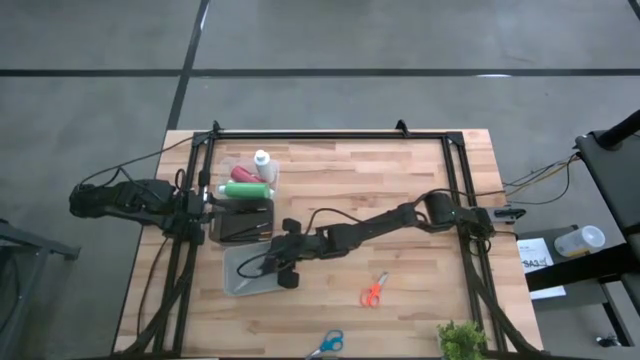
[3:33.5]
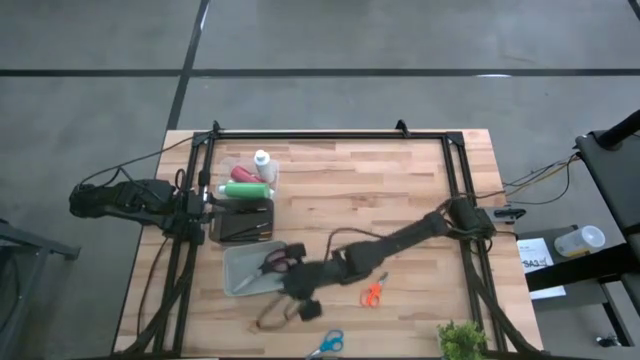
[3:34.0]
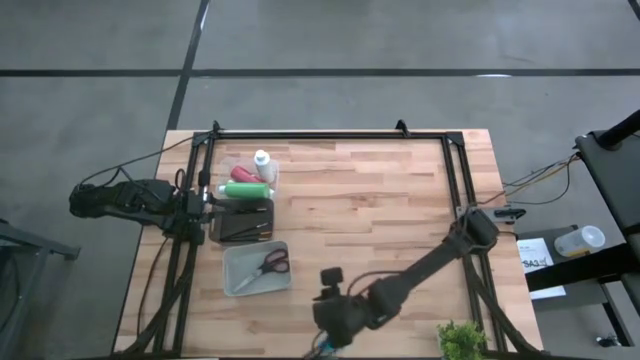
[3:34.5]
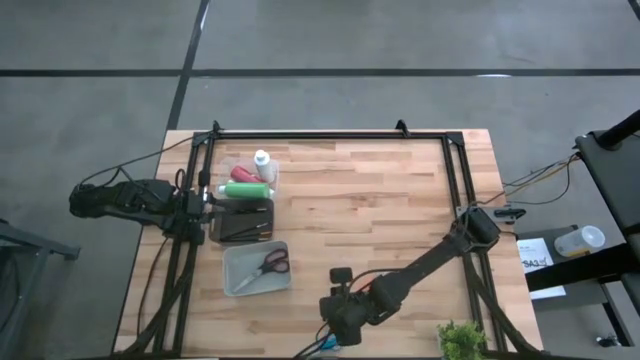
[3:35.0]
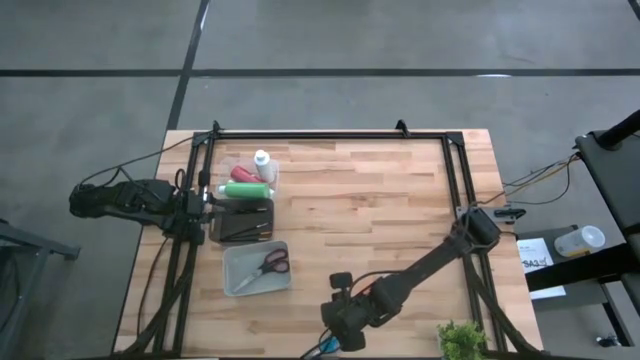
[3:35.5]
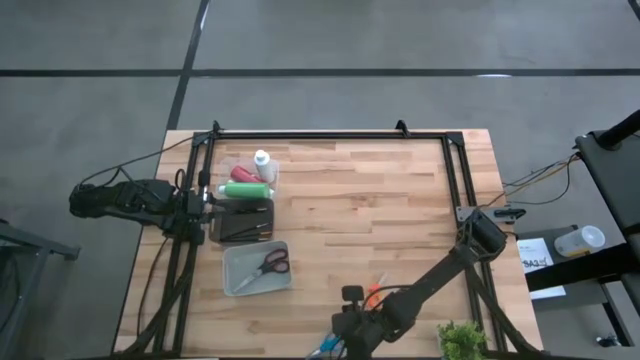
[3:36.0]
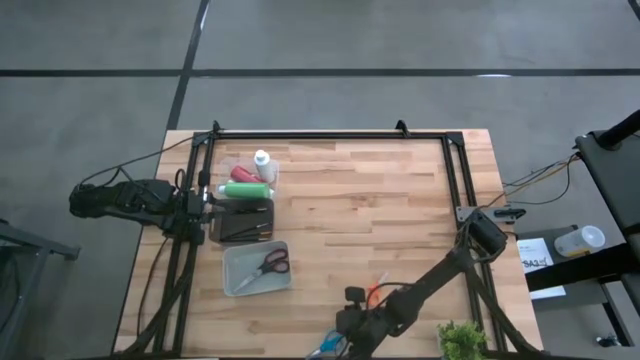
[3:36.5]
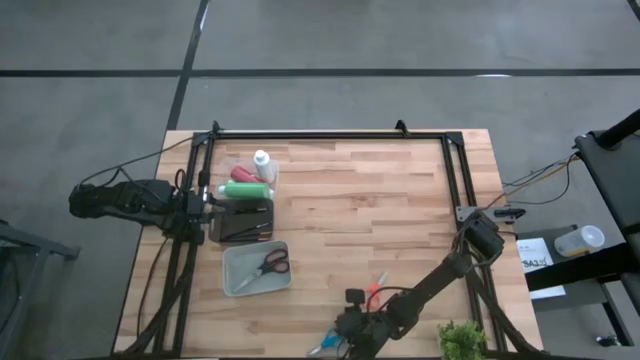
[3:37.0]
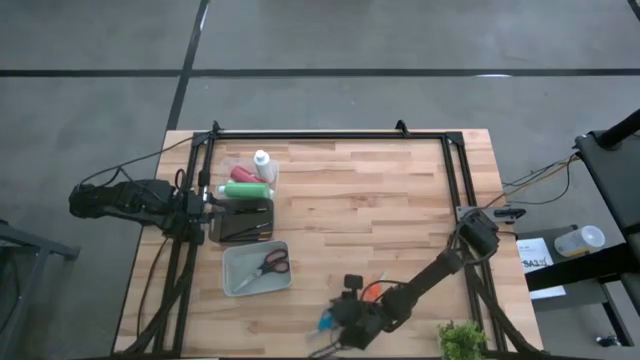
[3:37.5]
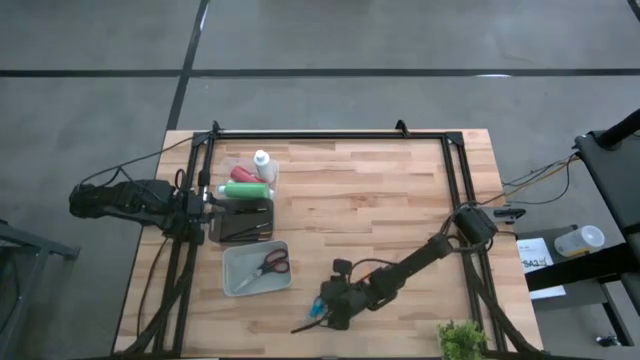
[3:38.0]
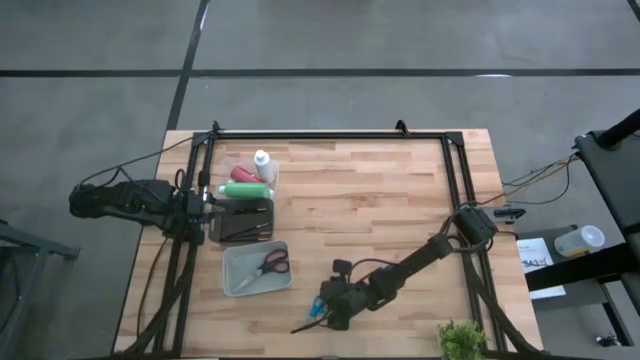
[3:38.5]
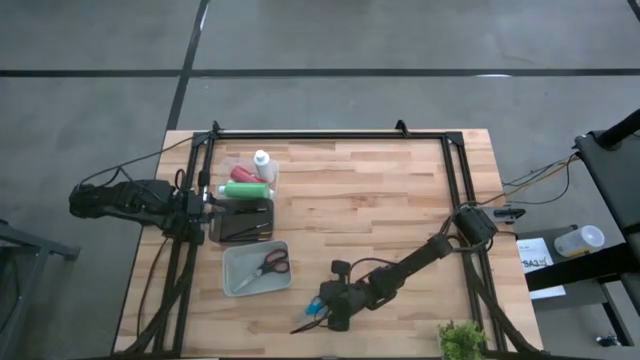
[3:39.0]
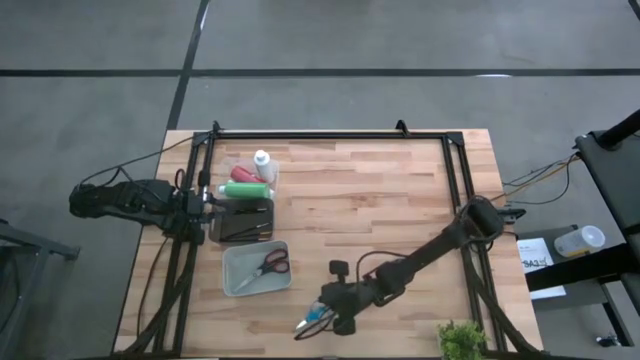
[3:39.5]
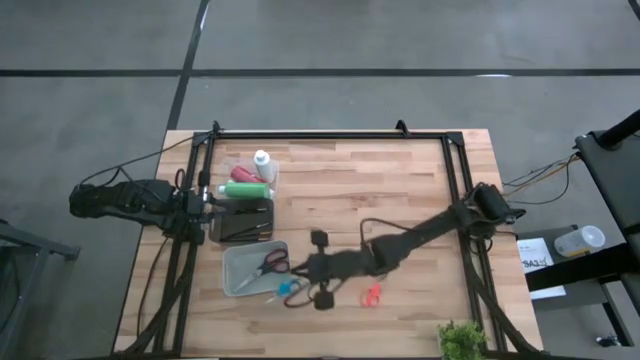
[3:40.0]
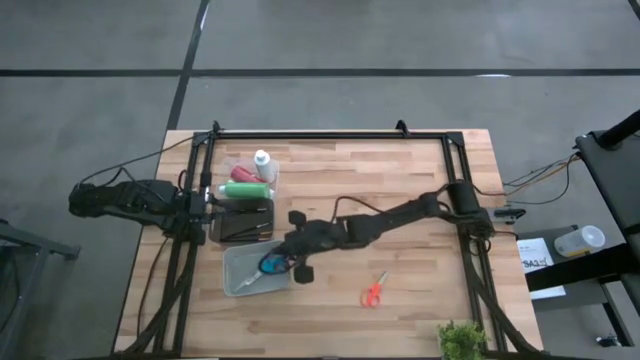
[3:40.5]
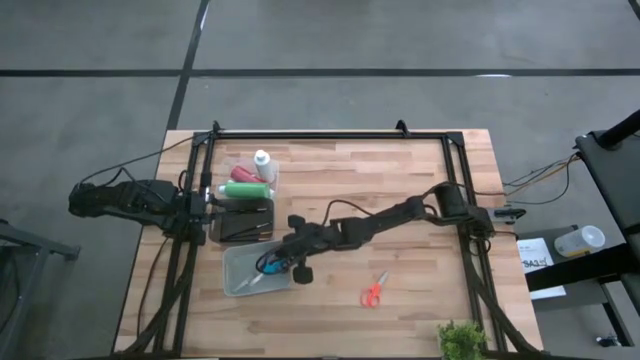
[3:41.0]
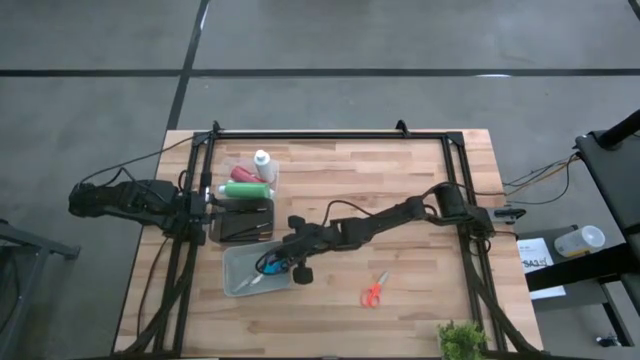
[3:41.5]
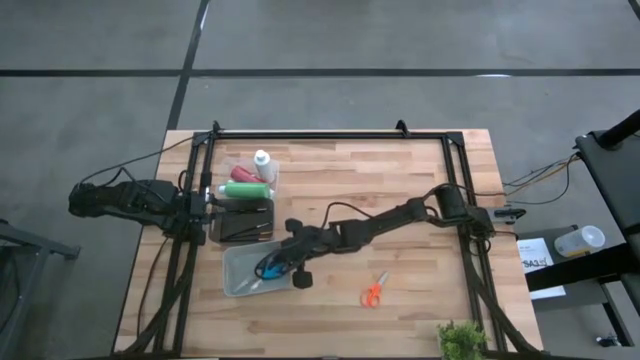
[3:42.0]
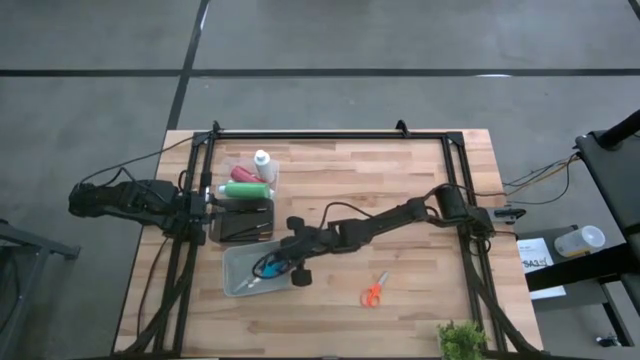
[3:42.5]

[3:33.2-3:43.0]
Task: Pick & Place Paint Supplies
Put the blue scissors into the gray bin

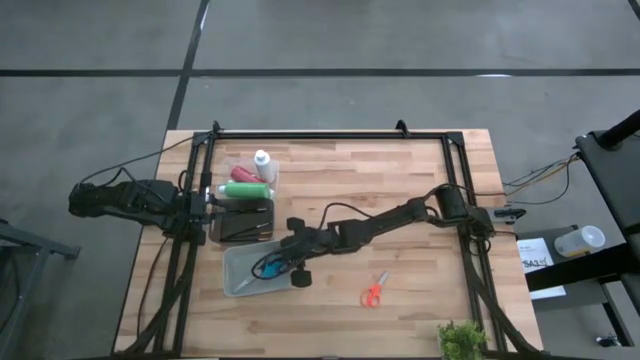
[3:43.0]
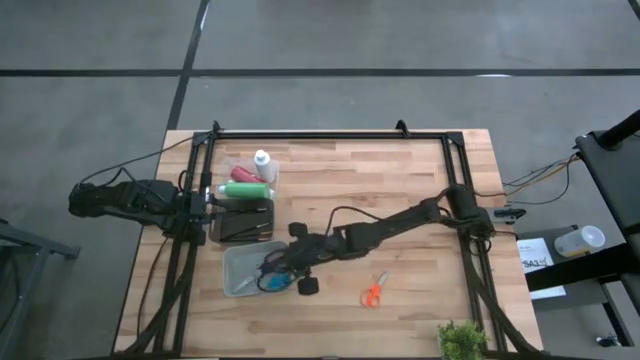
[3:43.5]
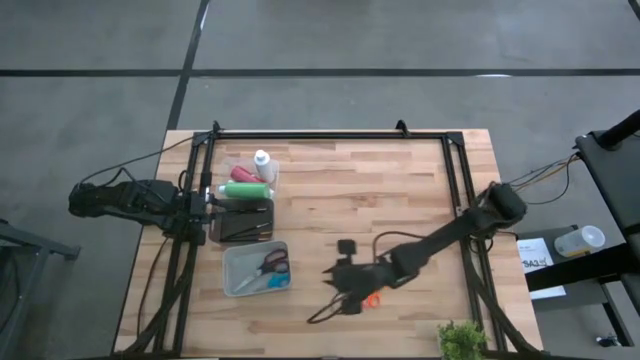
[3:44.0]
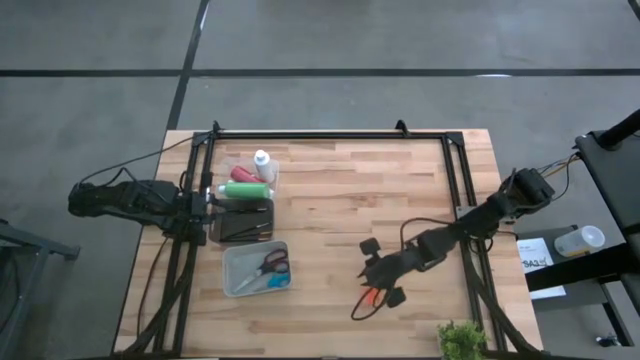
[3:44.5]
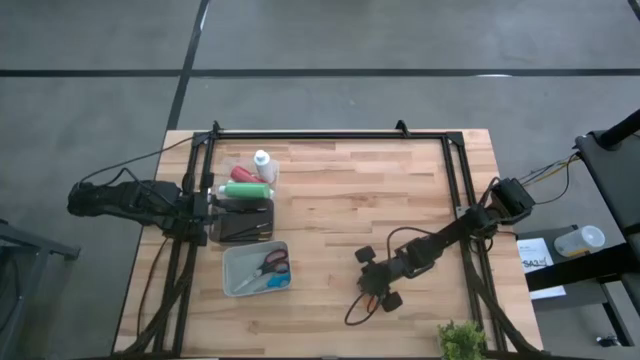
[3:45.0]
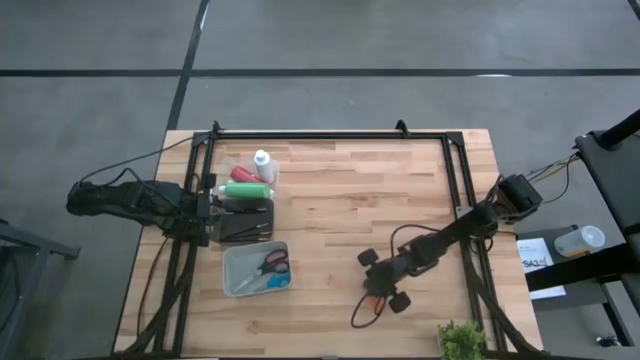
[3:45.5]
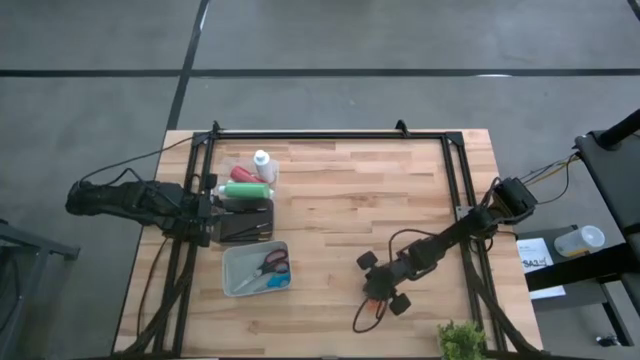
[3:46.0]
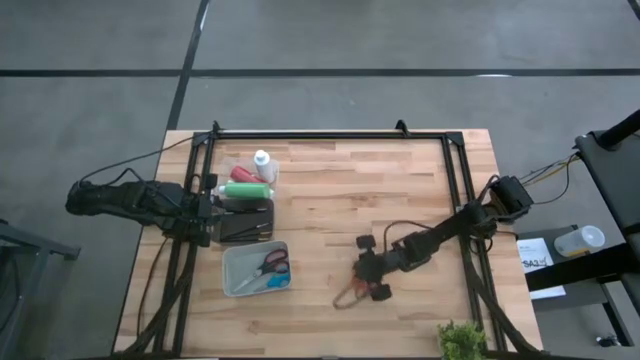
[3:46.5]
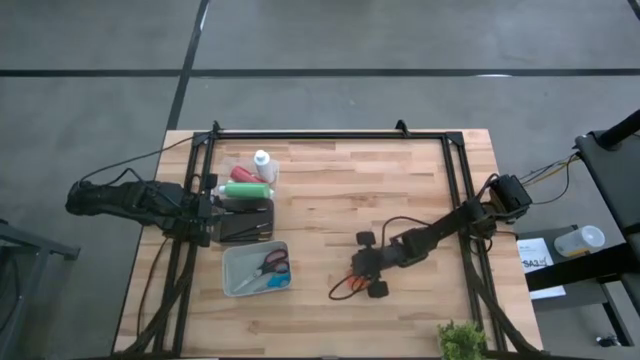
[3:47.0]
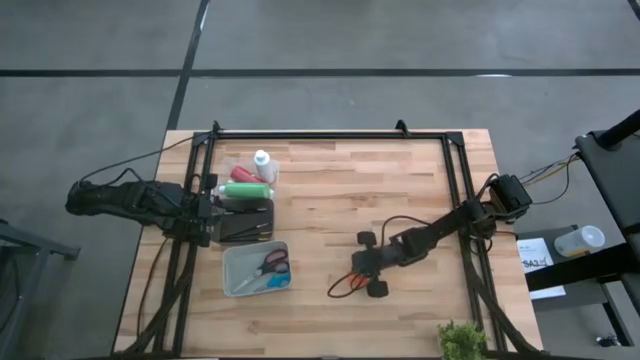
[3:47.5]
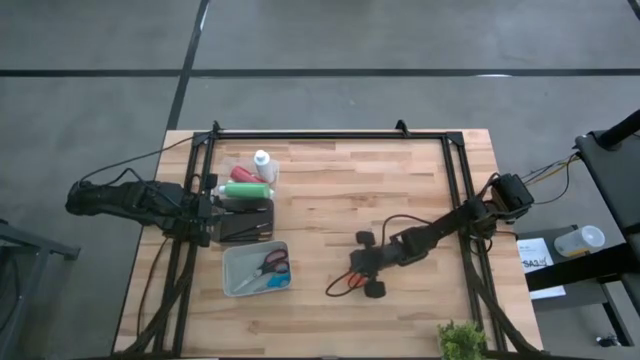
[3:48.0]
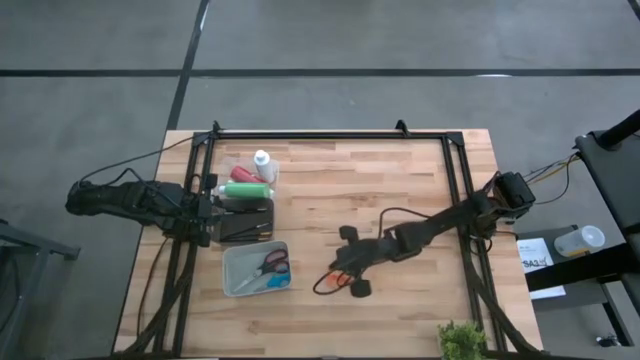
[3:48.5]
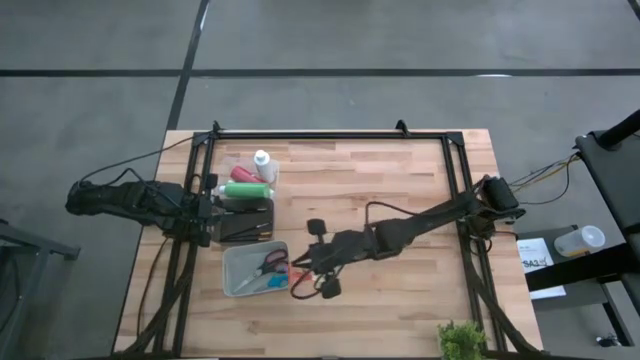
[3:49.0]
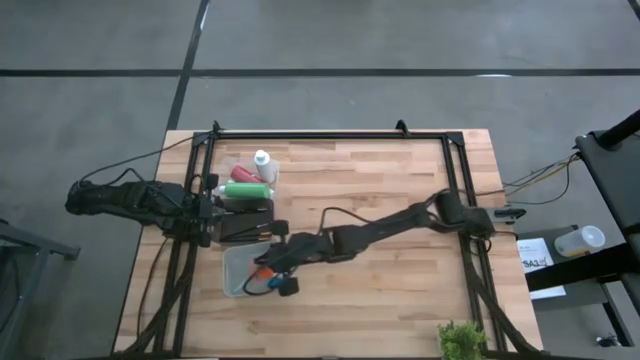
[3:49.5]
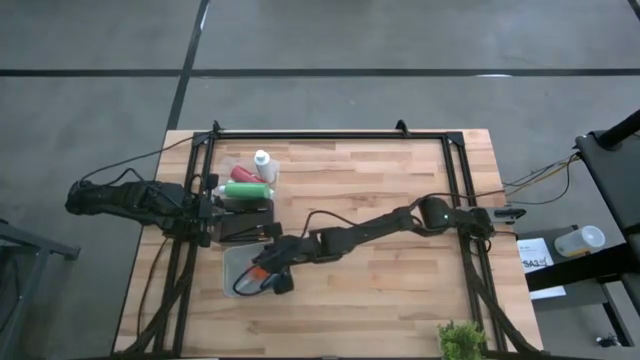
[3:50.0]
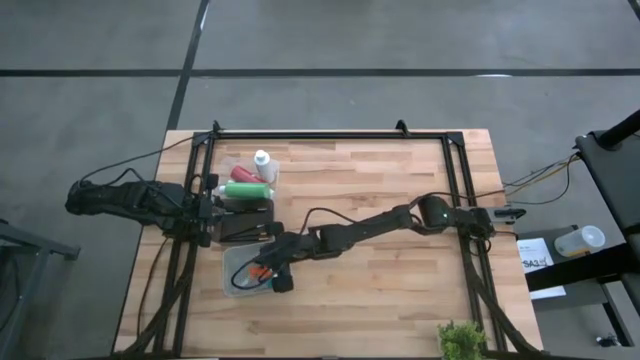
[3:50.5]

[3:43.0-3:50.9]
Put the orange scissors into the gray bin

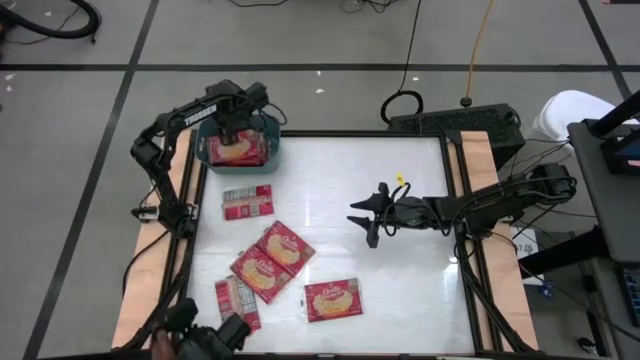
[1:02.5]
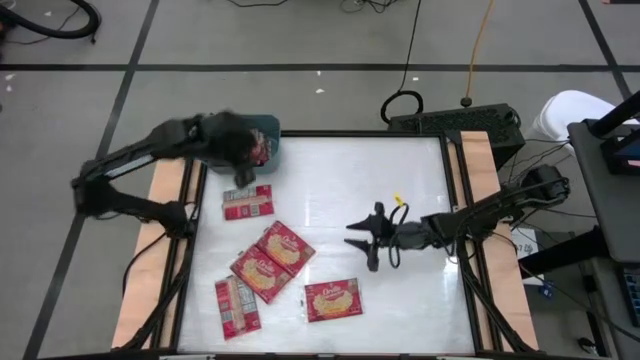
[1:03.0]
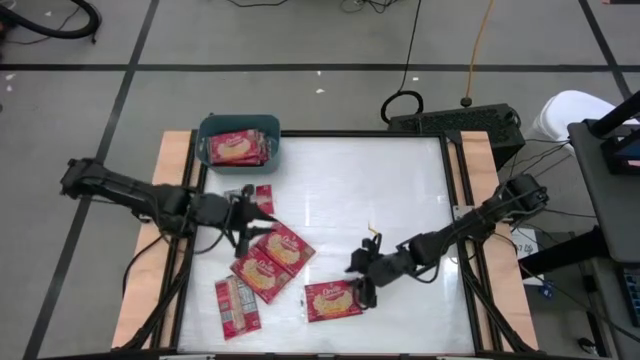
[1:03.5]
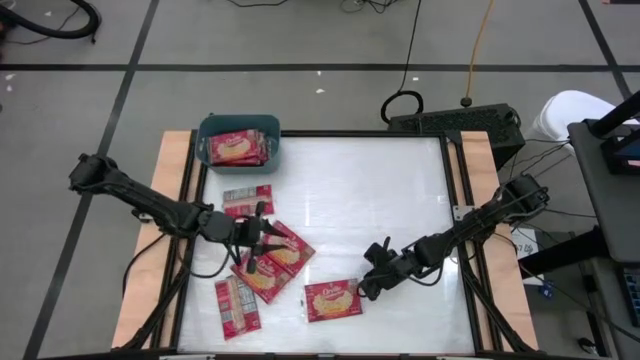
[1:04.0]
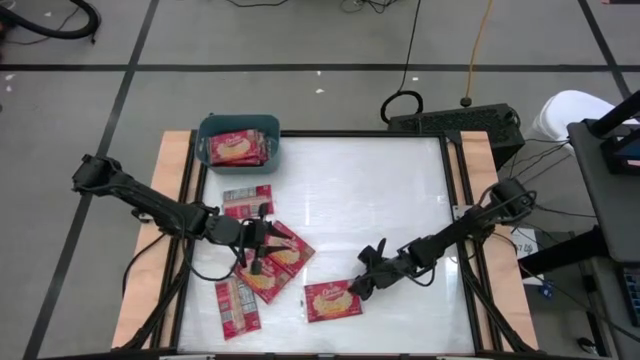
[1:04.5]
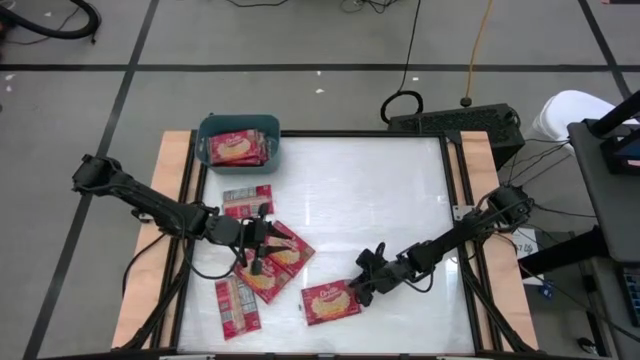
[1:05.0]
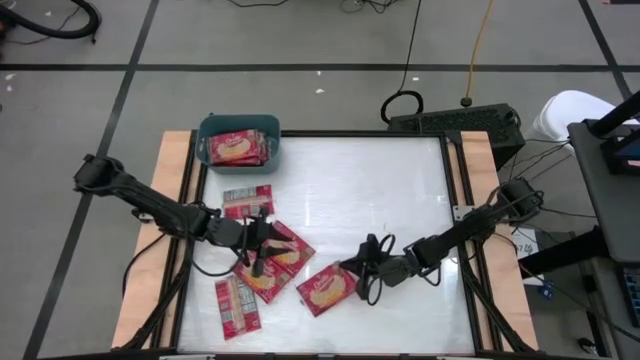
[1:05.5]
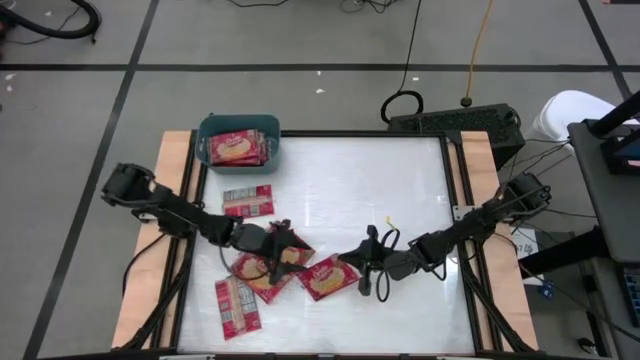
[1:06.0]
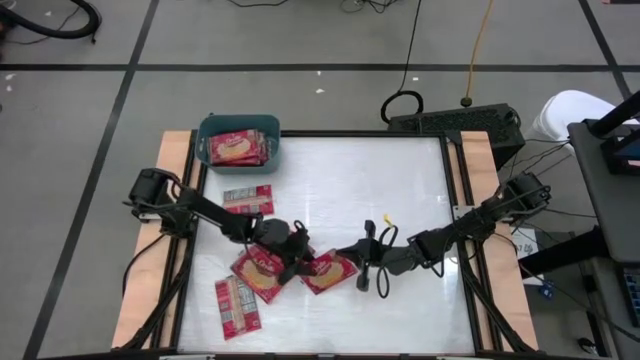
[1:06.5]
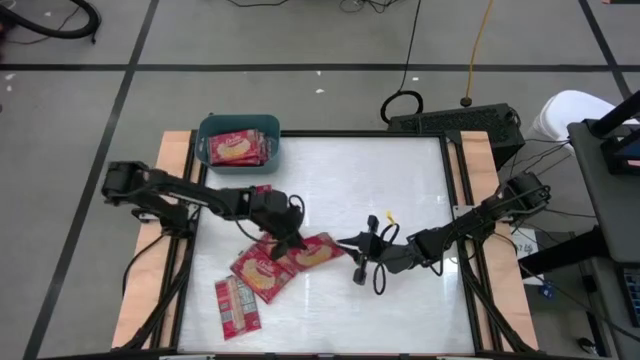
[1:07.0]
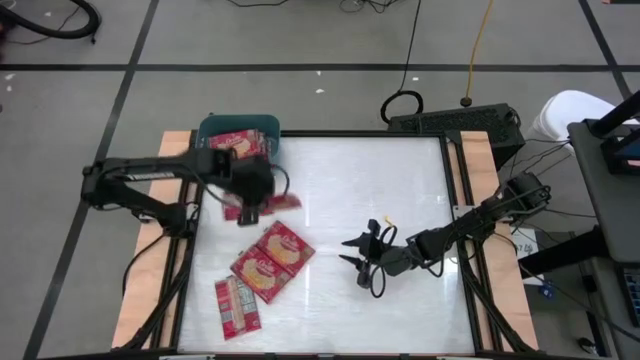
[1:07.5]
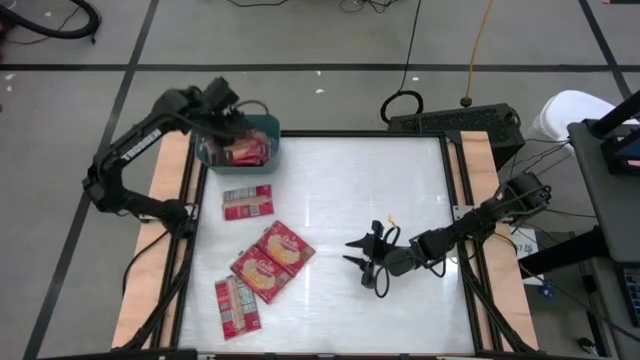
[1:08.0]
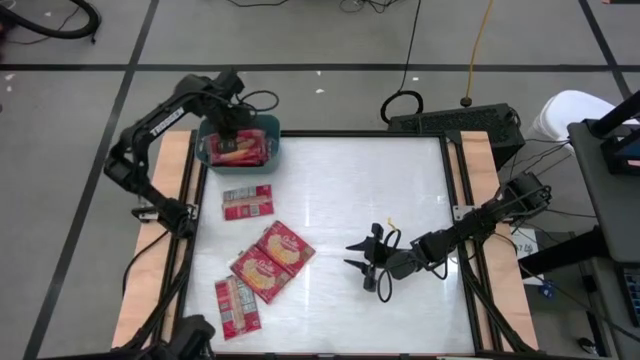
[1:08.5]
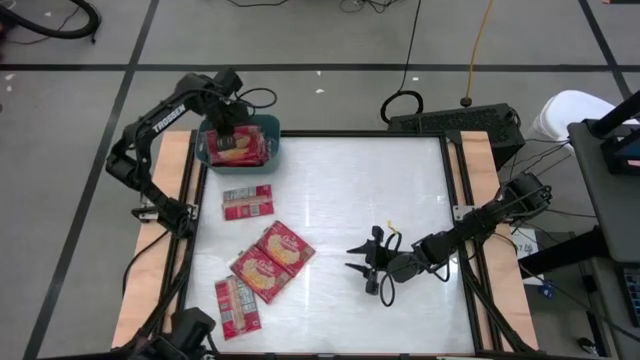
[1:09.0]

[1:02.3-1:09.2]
Task: Sort popcorn bags into baskets
Put the red popcorn bag into the blue bin
